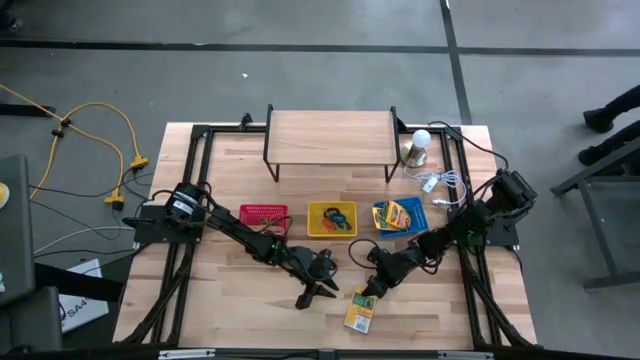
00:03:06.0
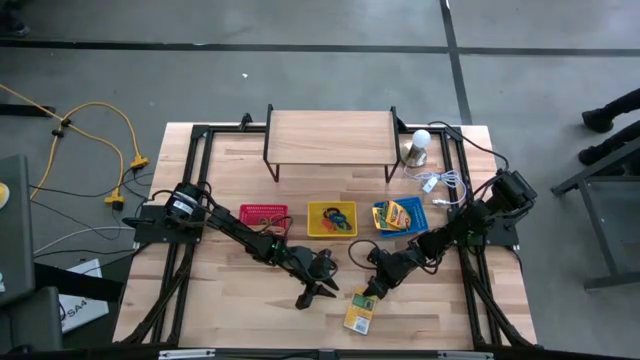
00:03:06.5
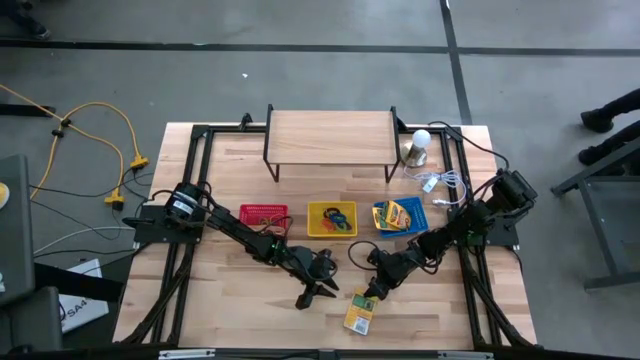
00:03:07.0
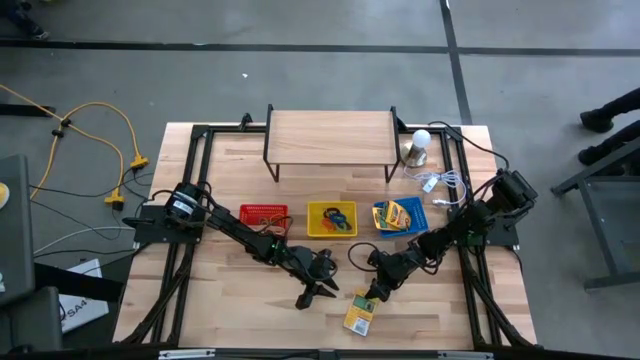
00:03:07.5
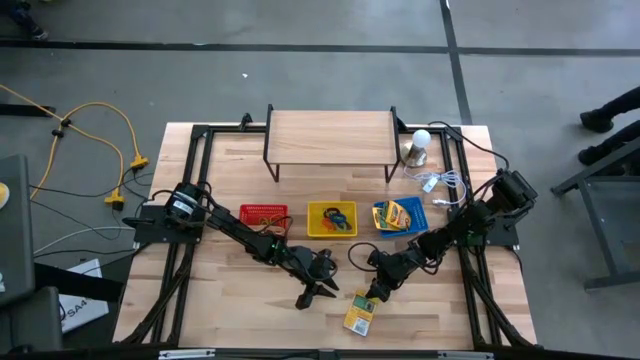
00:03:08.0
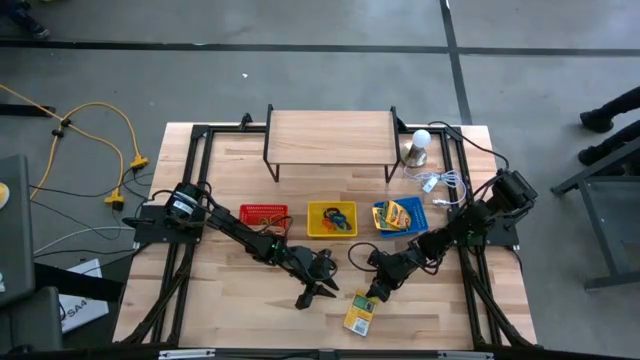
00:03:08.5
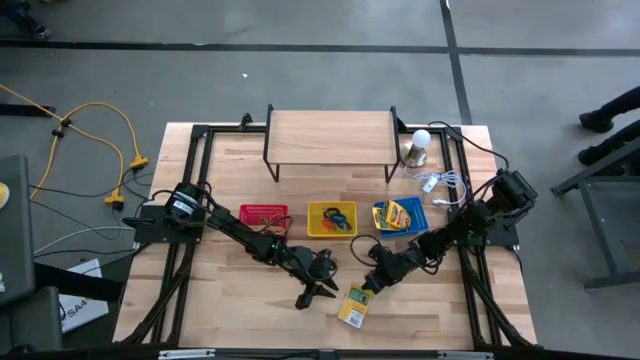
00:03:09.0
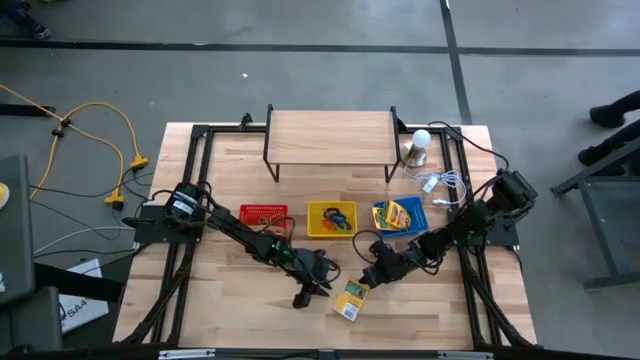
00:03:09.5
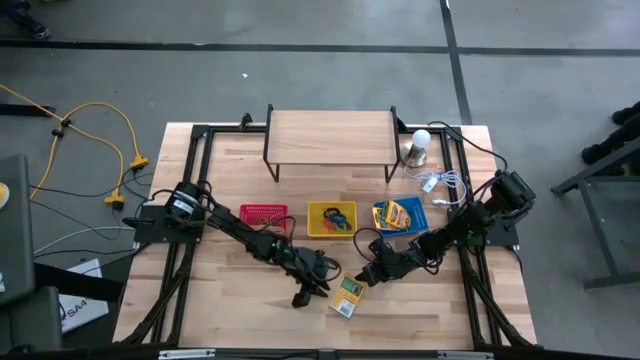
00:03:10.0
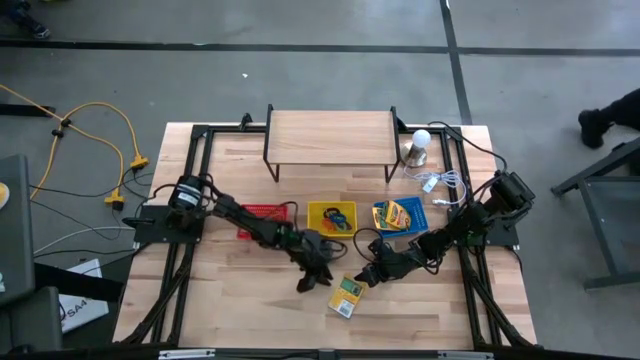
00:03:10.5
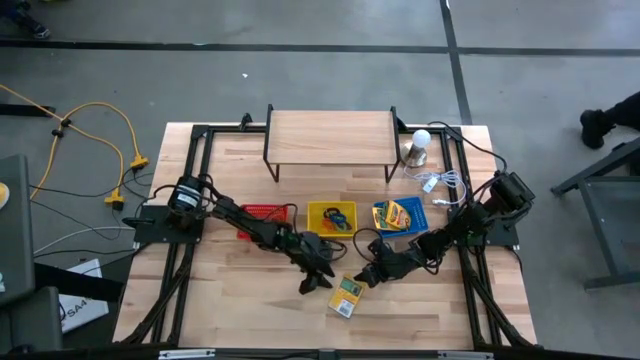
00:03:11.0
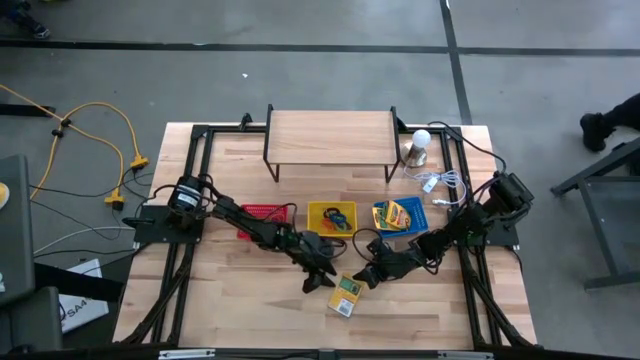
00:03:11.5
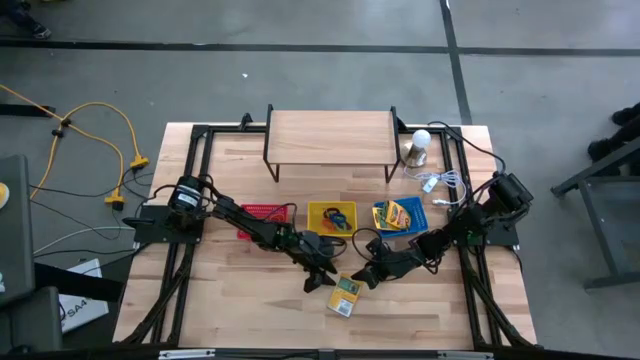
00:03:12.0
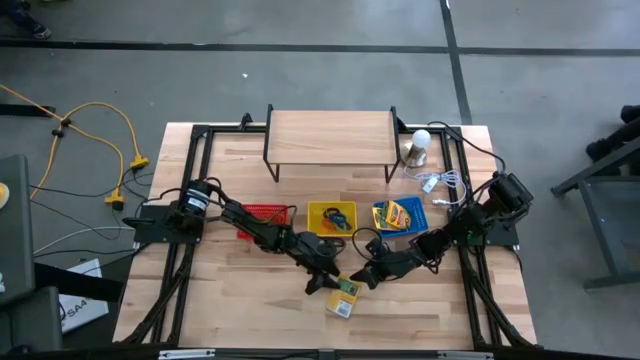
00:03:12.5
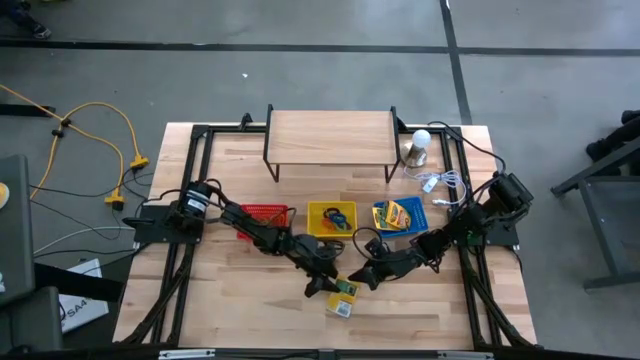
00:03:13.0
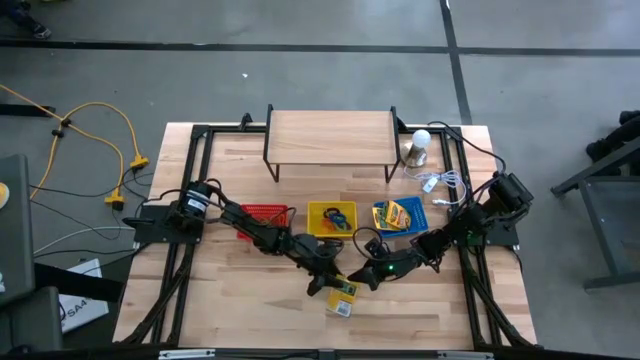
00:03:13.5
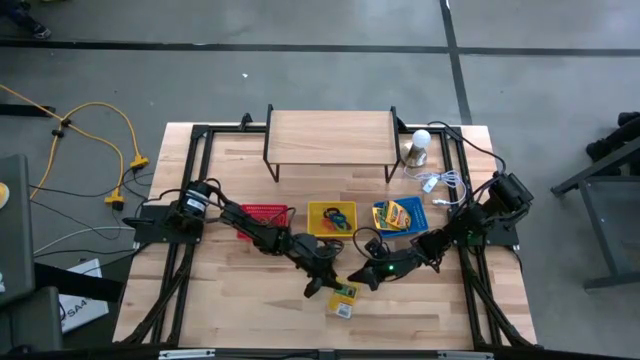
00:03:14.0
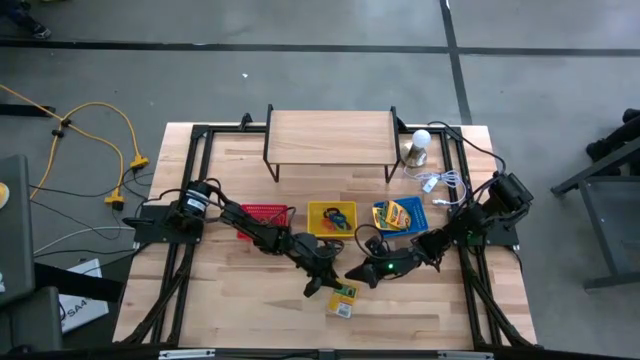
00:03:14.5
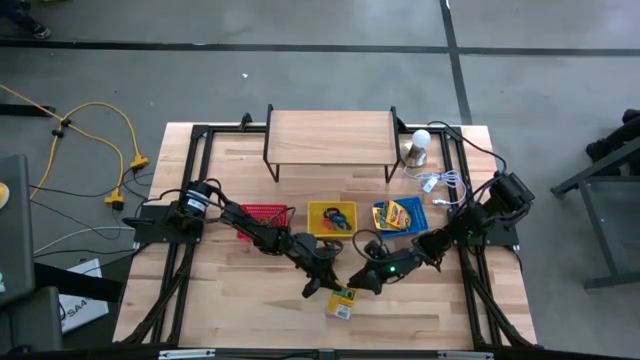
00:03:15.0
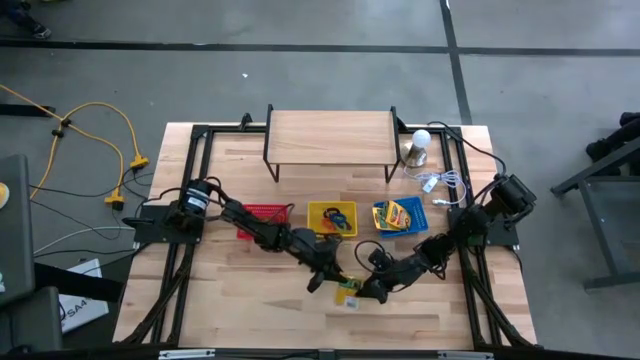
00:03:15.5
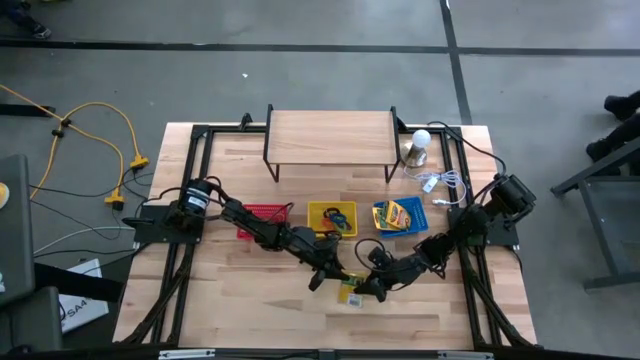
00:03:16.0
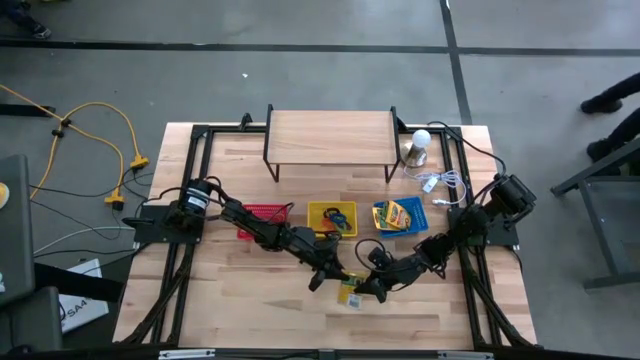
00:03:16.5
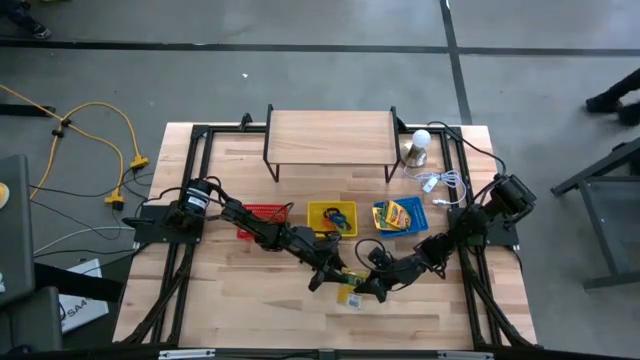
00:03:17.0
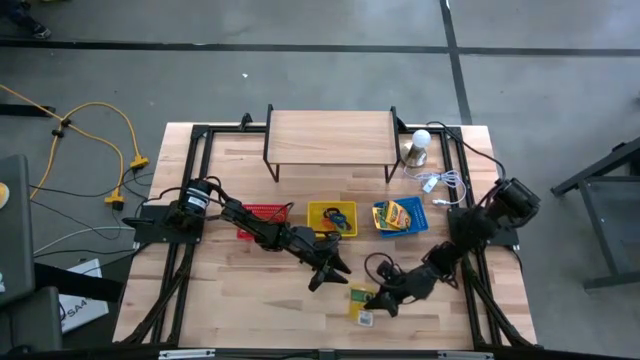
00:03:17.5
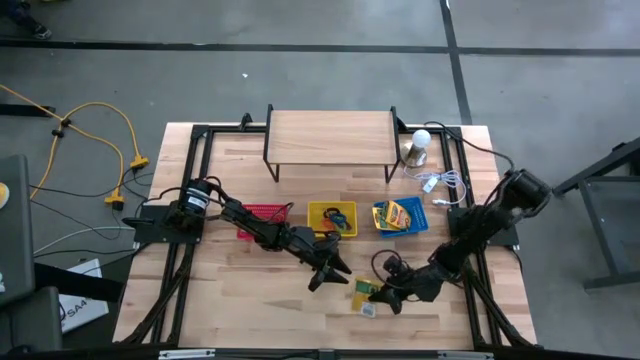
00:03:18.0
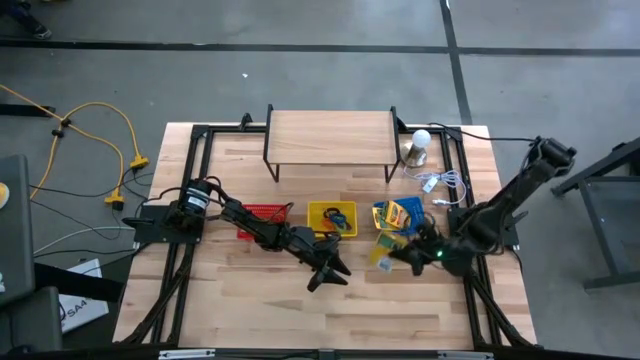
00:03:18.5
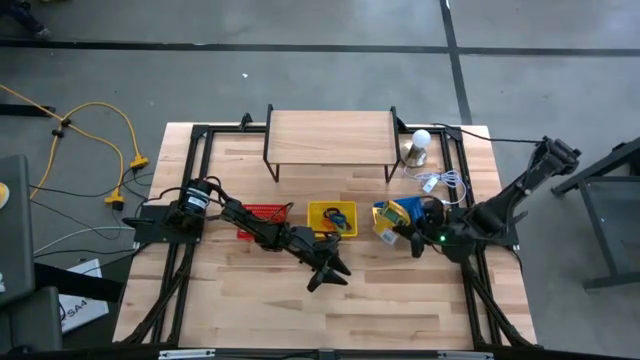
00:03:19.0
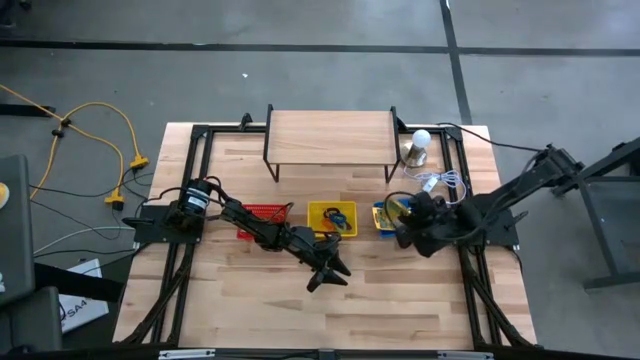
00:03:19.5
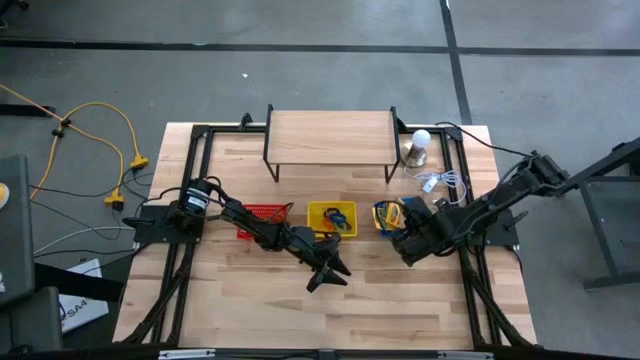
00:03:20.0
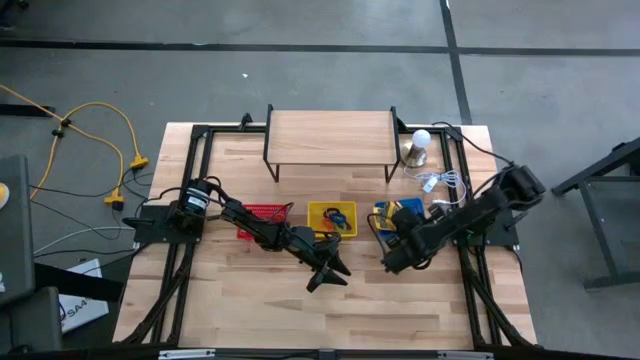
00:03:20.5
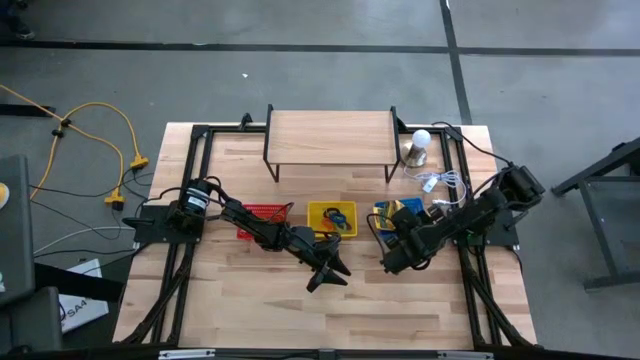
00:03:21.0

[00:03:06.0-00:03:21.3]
Task: Pick & Place Office Desk Supplies
Put the box of crayons into the blue bin

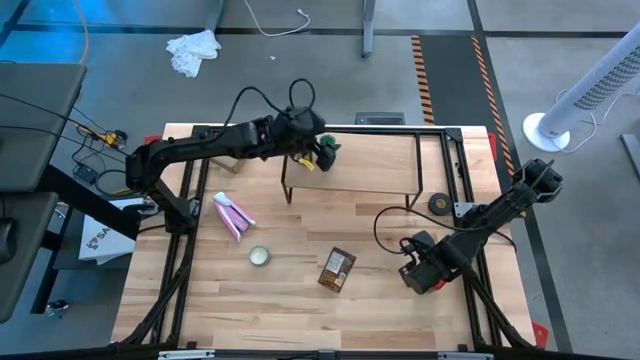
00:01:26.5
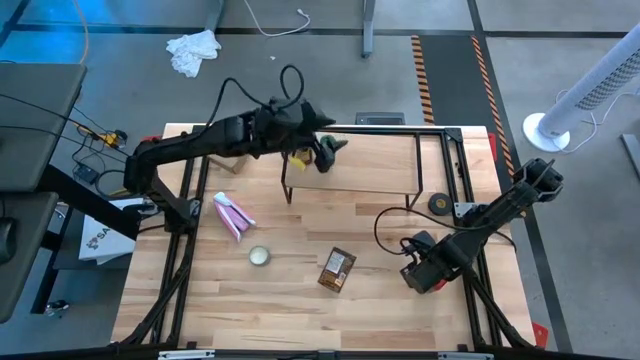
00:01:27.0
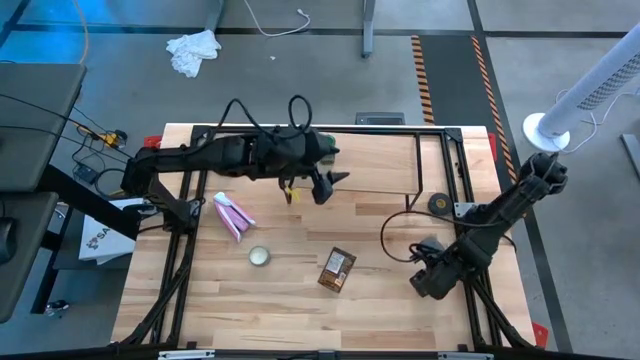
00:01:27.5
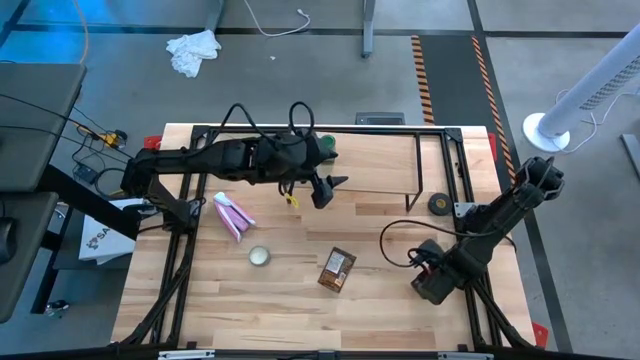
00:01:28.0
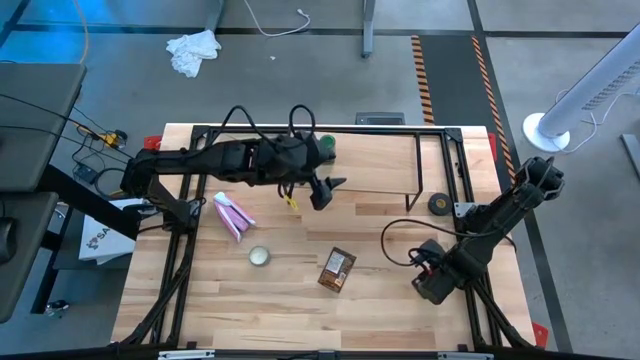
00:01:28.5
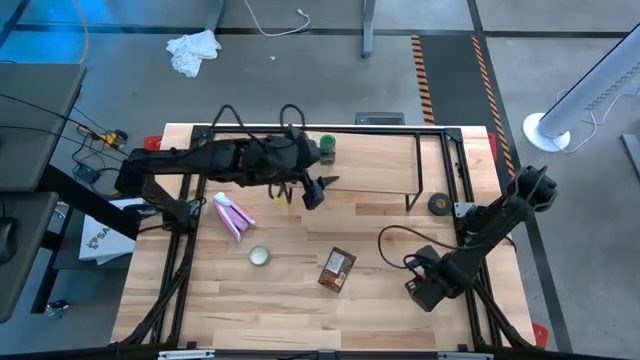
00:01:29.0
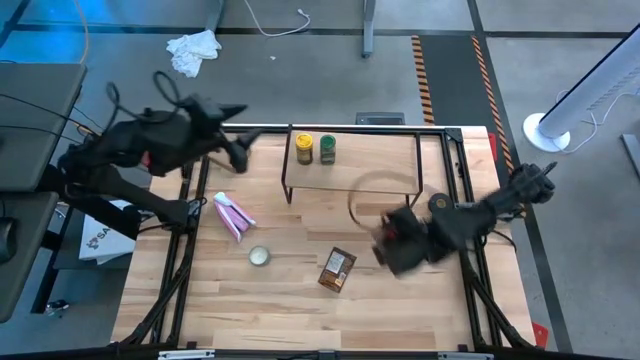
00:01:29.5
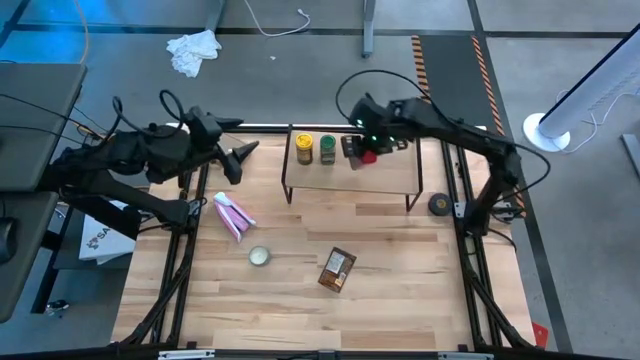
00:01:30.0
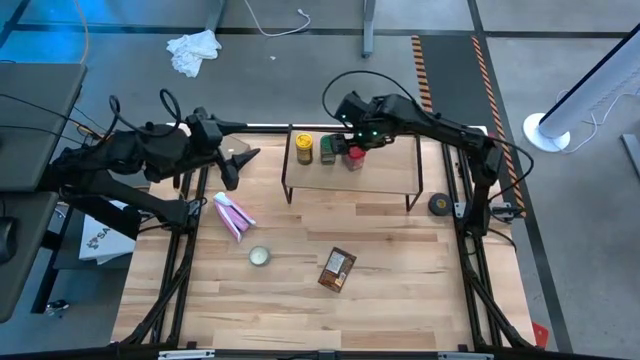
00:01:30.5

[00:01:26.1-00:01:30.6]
Task: Shelf spices
Put the red spice can on the shelf
